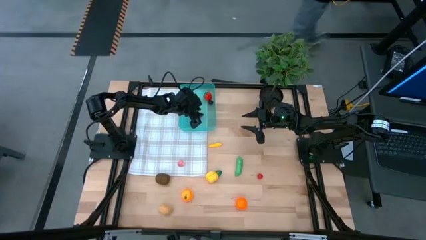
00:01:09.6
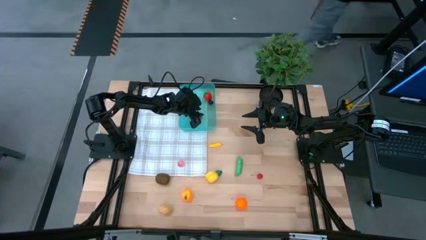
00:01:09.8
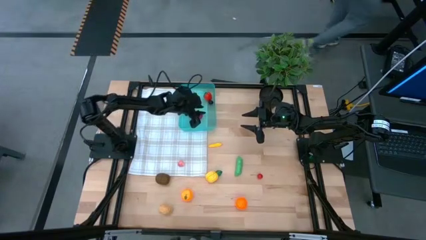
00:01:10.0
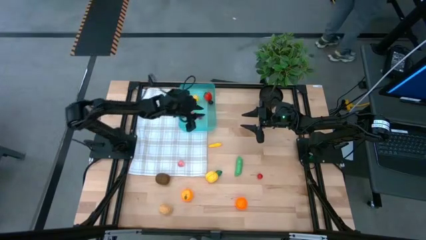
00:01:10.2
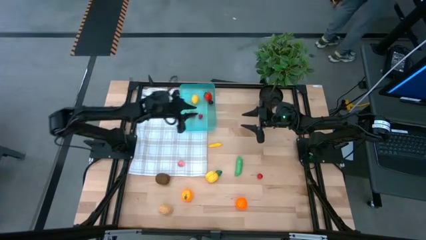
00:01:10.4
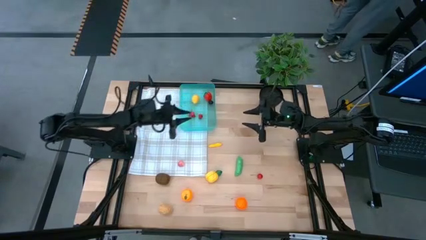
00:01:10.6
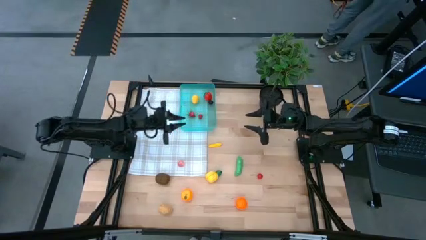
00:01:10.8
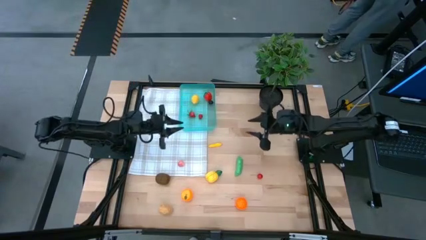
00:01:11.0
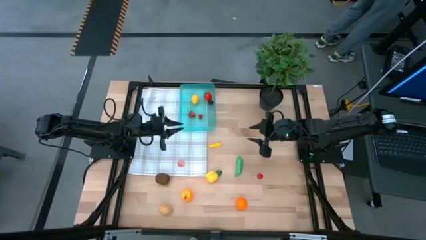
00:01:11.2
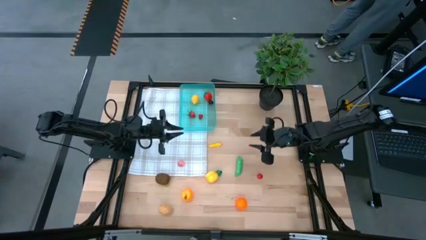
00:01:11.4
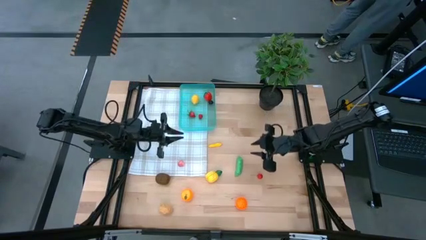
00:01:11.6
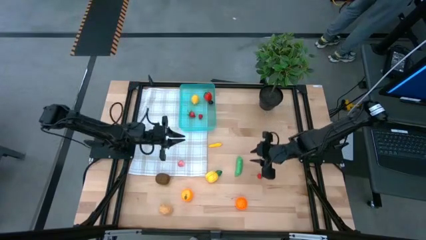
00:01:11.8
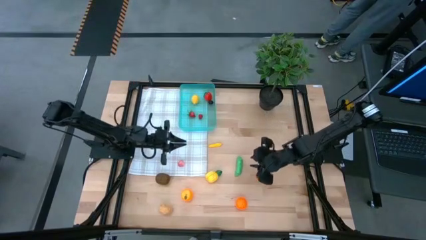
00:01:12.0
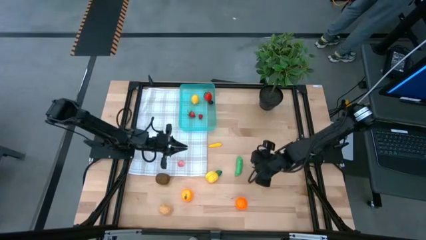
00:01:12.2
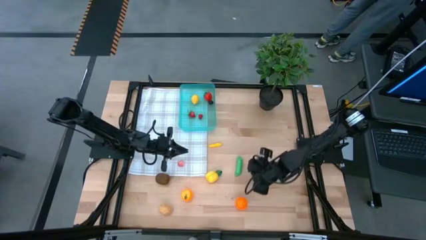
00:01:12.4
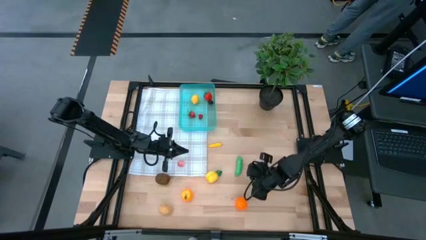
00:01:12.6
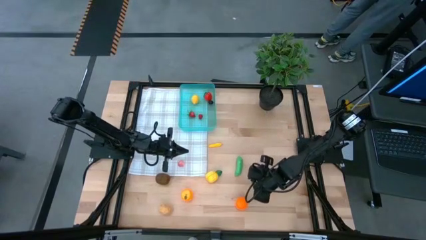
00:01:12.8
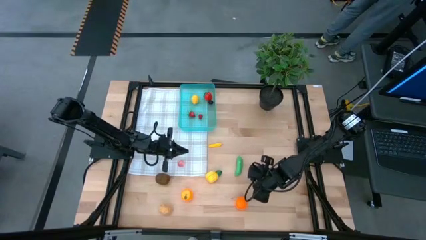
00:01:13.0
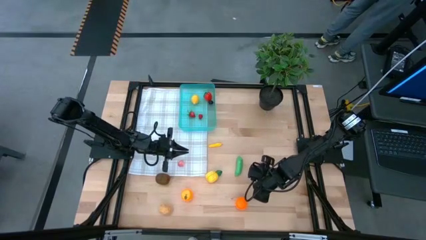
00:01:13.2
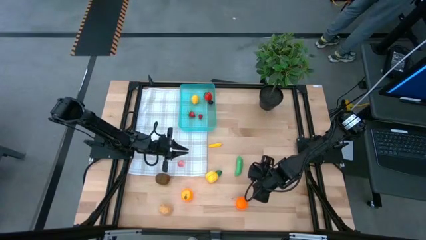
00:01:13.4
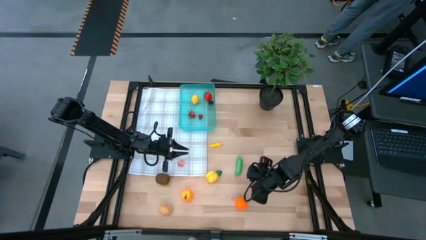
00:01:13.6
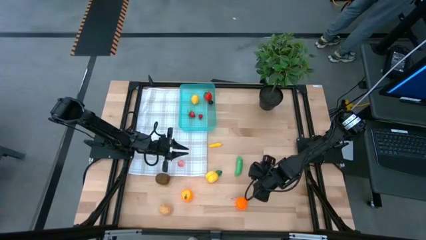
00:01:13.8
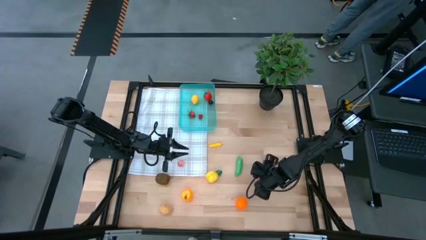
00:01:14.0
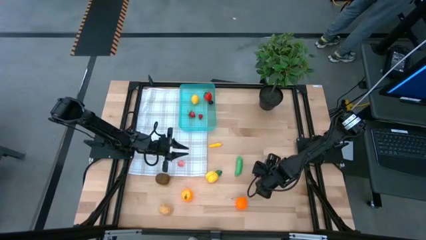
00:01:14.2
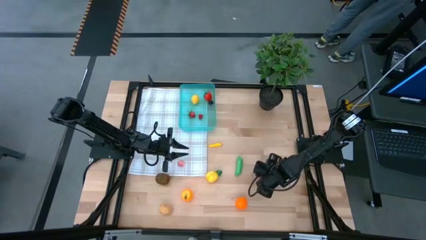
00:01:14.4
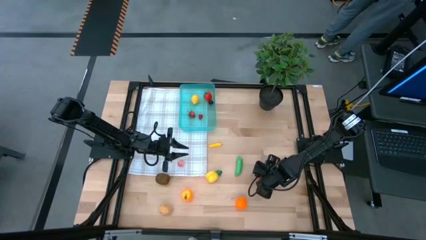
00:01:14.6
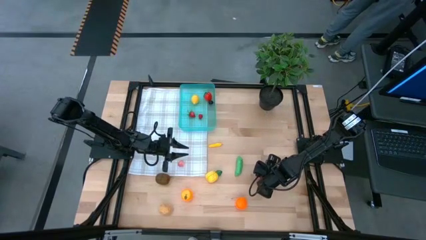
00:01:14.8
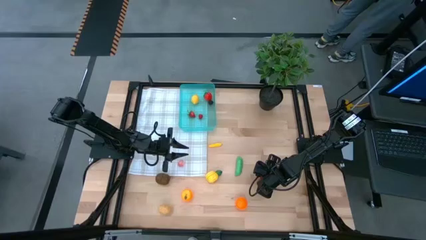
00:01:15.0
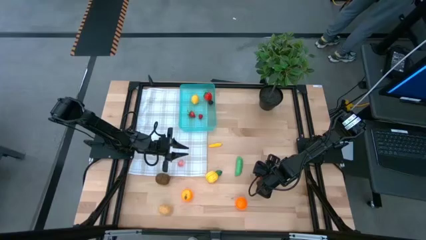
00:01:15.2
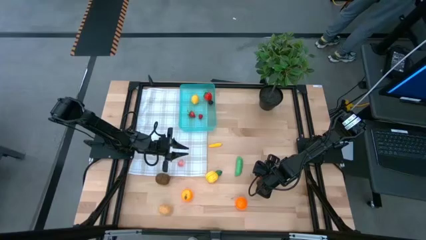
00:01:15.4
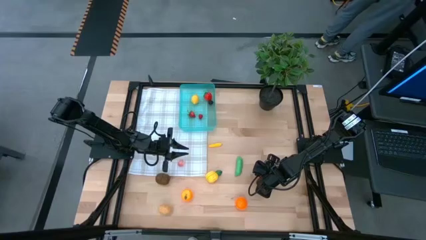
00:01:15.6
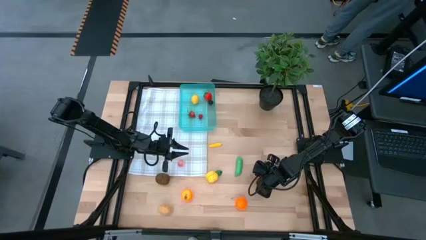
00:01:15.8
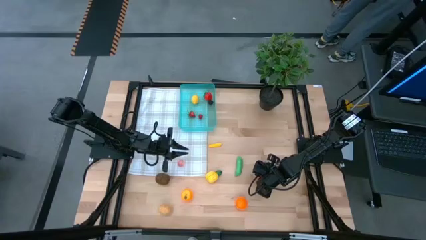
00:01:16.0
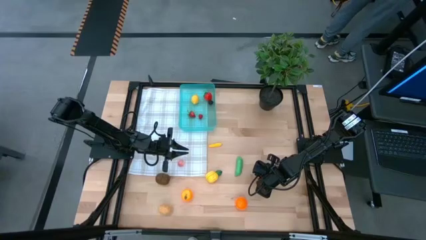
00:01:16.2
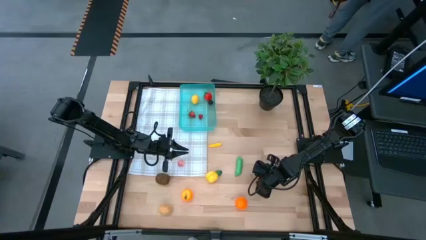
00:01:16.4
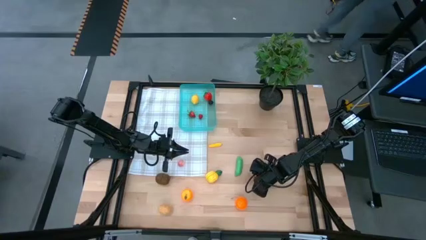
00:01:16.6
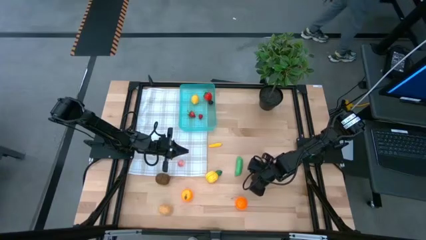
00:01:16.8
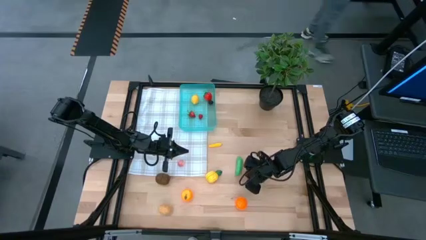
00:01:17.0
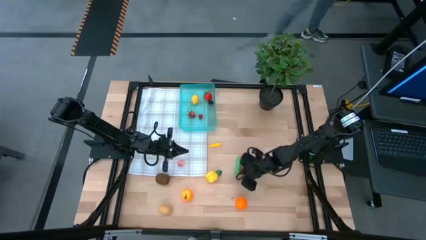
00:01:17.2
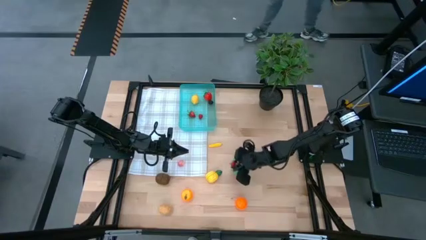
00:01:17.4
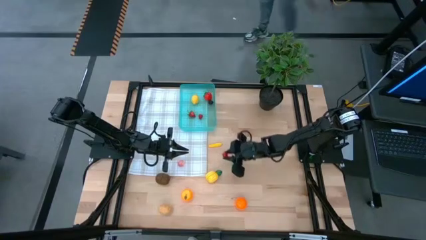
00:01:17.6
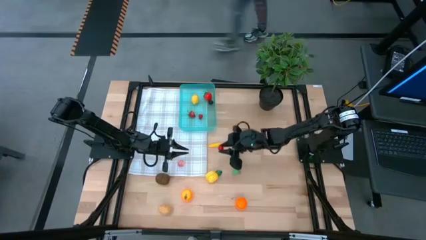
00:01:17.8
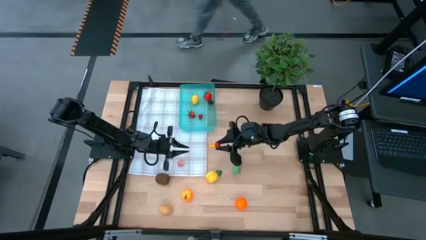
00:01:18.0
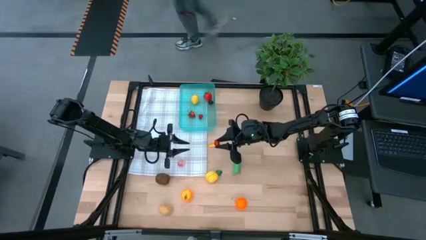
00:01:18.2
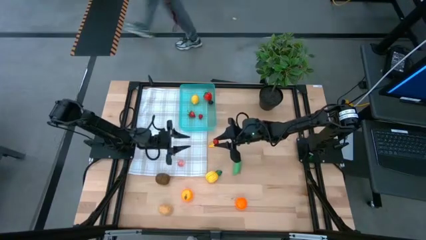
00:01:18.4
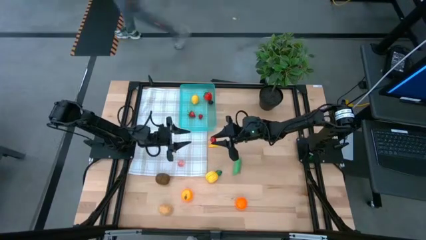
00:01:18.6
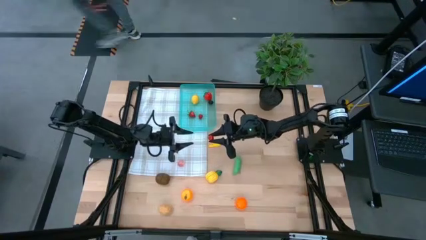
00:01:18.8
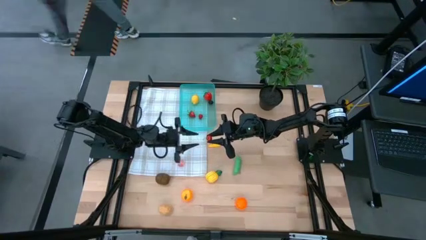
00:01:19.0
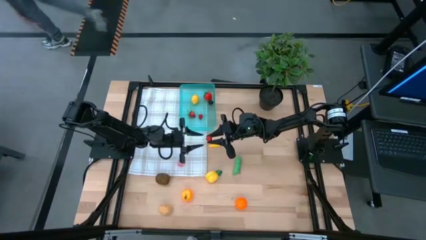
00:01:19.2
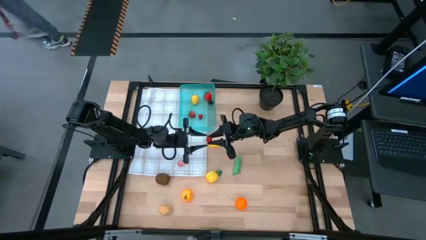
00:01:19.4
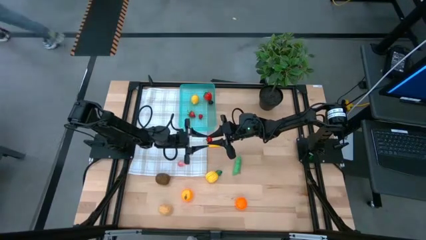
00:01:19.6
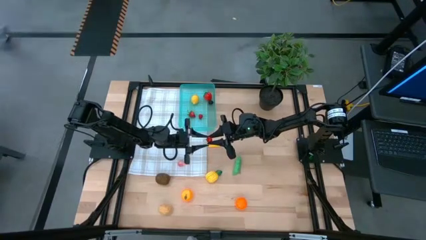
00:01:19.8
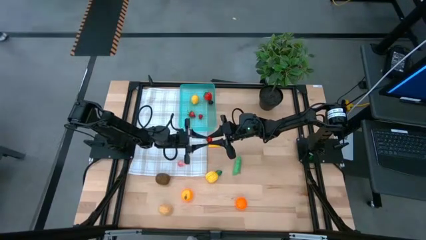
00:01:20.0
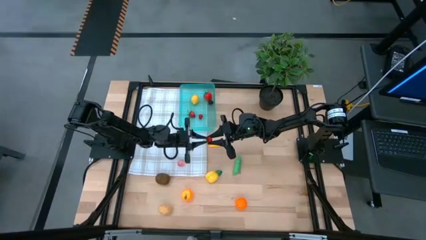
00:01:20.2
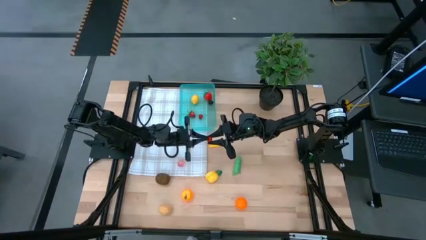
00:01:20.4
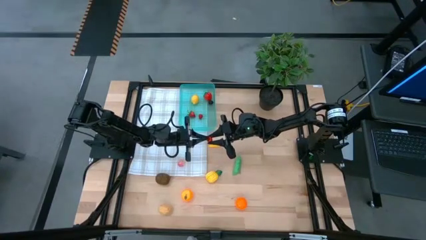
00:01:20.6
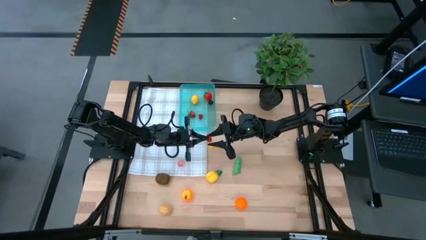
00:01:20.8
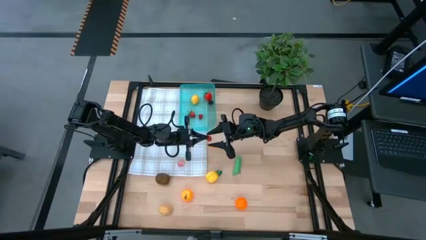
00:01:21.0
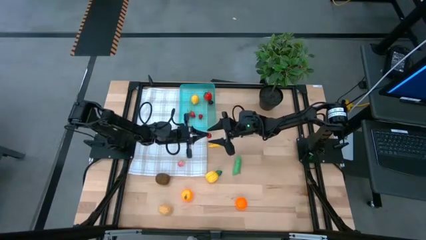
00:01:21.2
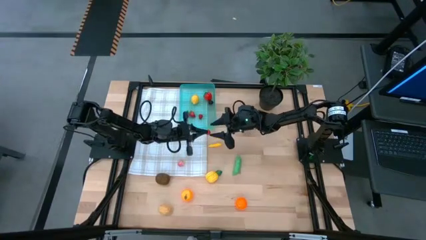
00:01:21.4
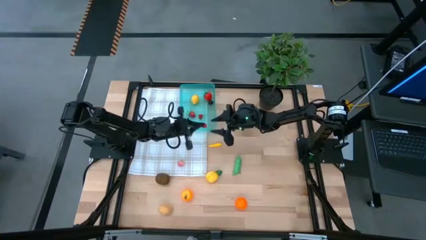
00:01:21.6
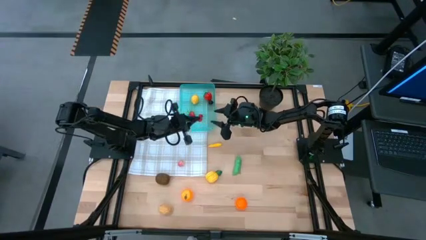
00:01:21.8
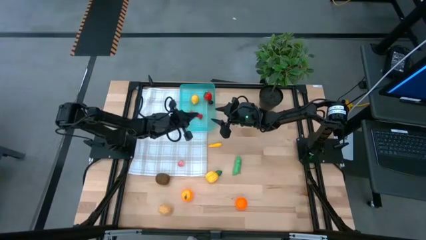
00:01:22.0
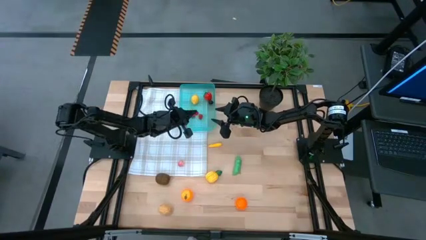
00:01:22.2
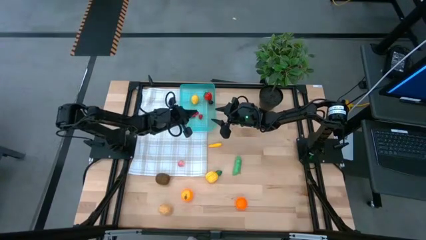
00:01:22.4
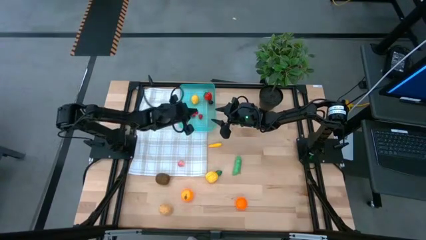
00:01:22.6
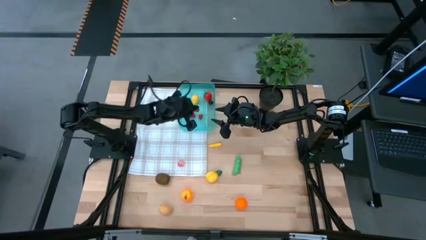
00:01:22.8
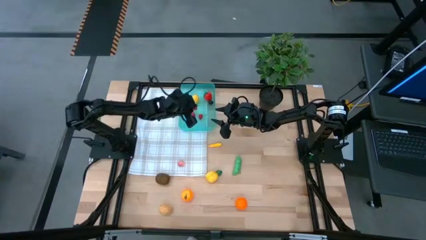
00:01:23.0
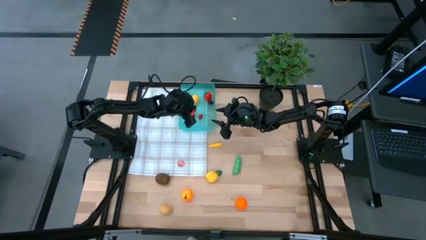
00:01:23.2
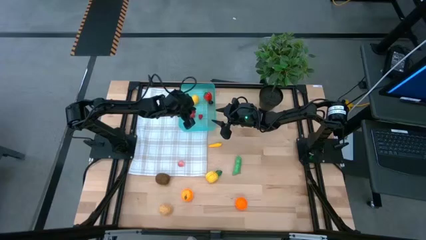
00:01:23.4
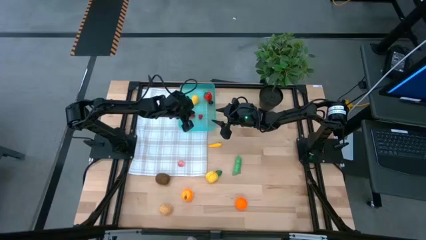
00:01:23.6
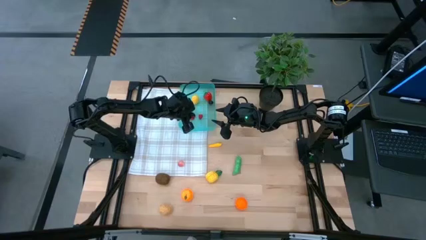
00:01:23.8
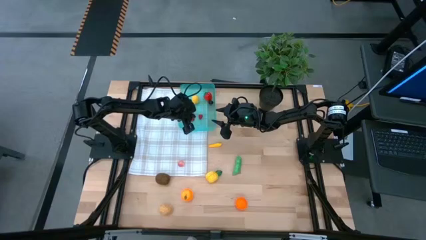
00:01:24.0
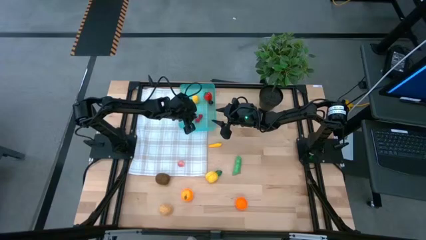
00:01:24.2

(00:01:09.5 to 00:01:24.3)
Task: Pick and placing Produce into tupperware
Put the red cherry into the blue bin

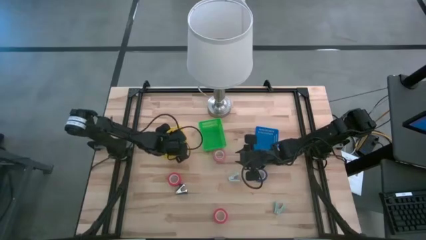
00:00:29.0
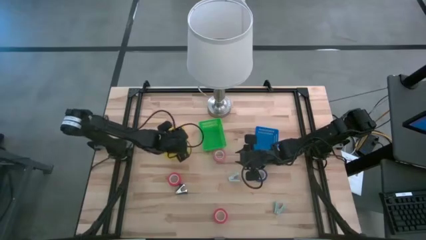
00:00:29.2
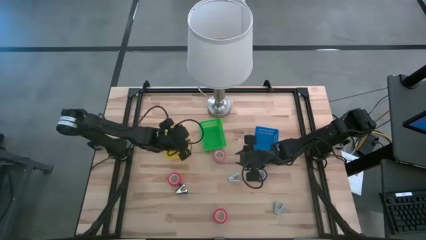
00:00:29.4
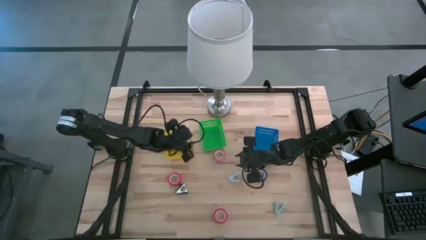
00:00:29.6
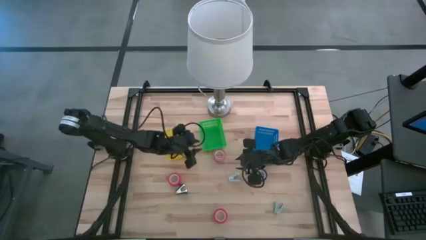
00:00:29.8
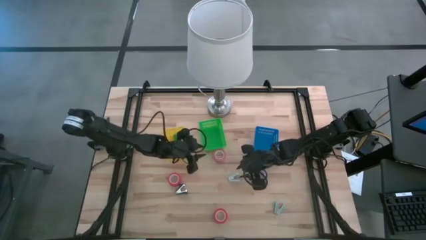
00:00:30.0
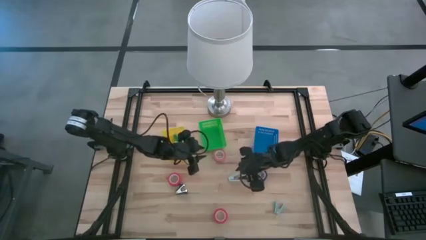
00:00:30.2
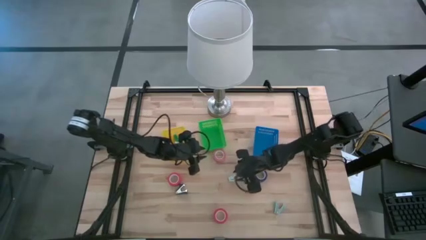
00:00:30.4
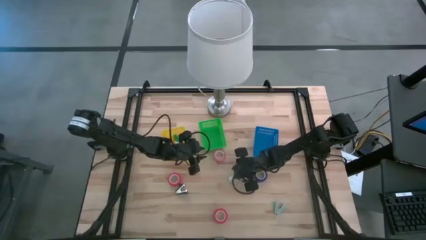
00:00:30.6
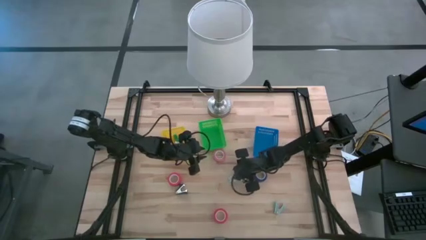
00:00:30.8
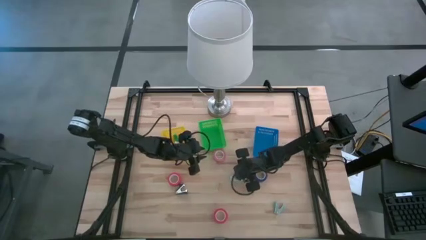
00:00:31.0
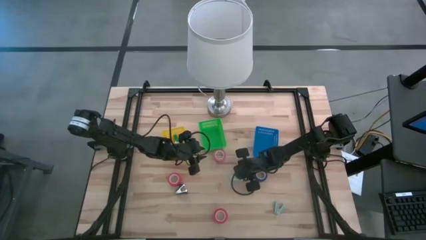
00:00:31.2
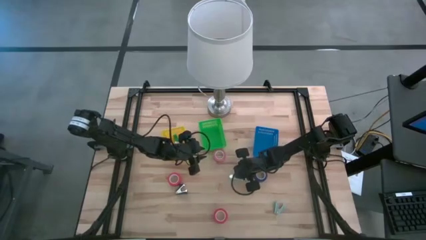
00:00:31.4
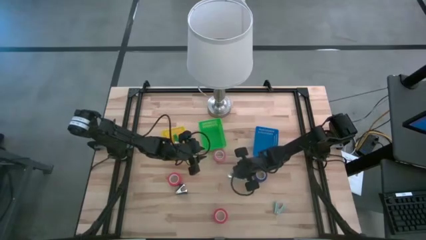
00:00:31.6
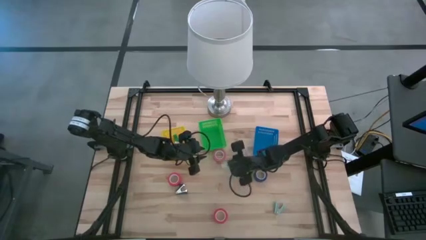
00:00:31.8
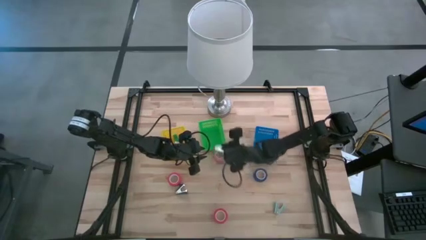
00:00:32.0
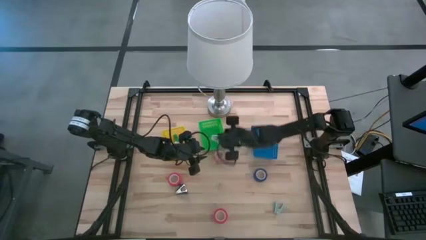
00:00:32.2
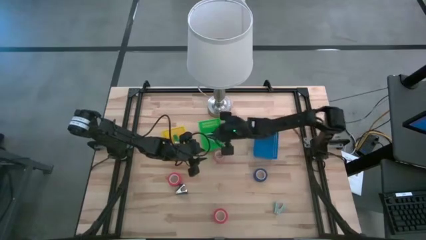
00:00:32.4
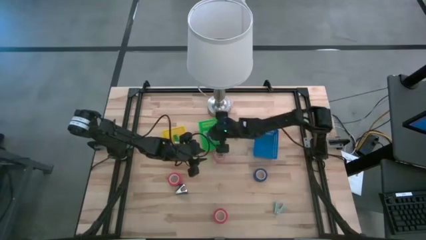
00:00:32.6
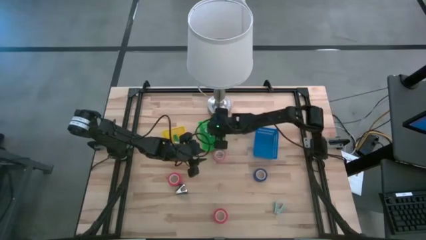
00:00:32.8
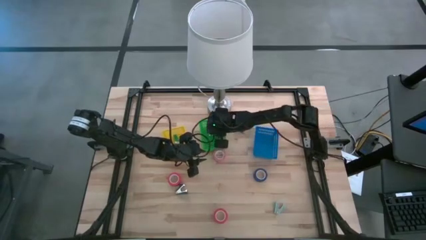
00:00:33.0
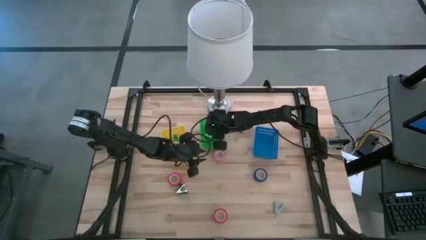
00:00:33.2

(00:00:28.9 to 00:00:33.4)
Task: Pick and place Stapler, Stapler remover, tape
Put the top blue staple remover into the green bin
